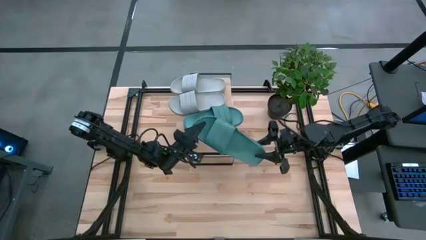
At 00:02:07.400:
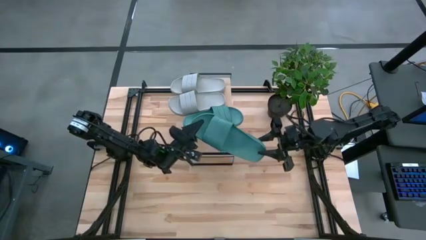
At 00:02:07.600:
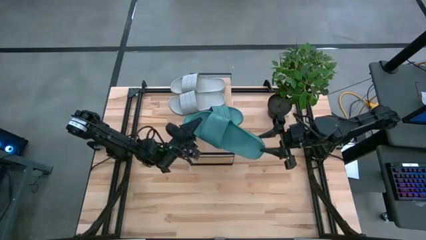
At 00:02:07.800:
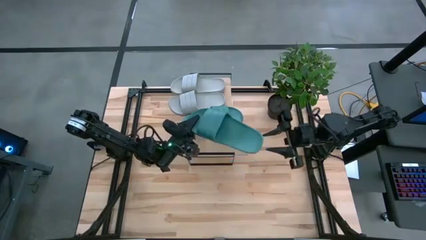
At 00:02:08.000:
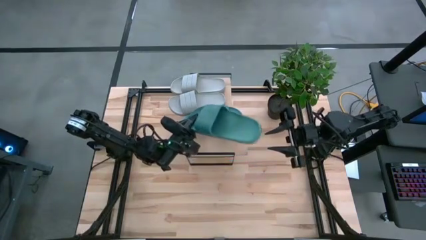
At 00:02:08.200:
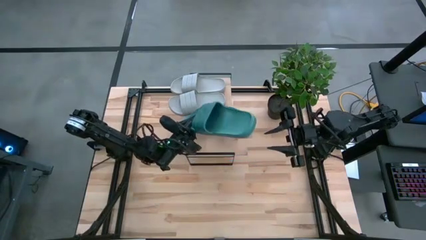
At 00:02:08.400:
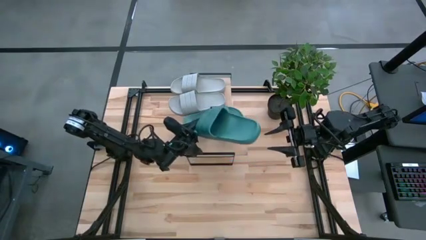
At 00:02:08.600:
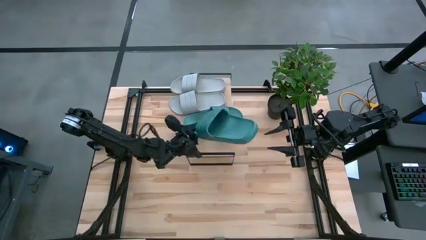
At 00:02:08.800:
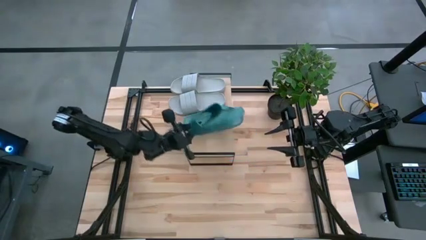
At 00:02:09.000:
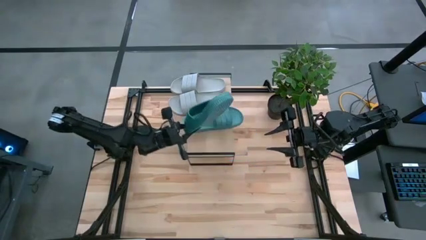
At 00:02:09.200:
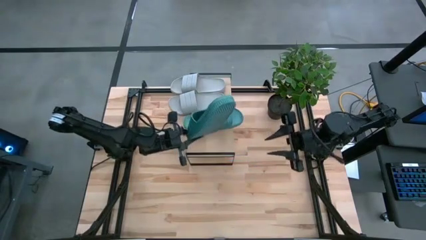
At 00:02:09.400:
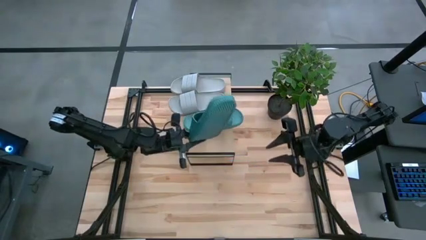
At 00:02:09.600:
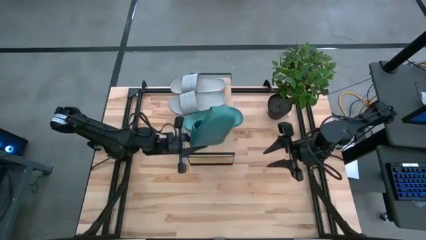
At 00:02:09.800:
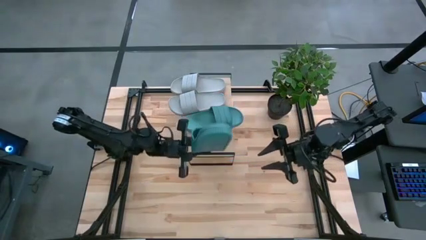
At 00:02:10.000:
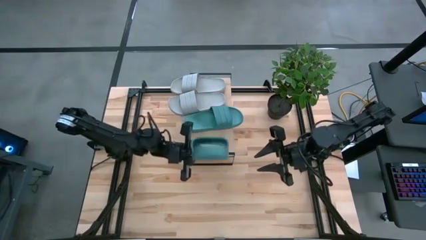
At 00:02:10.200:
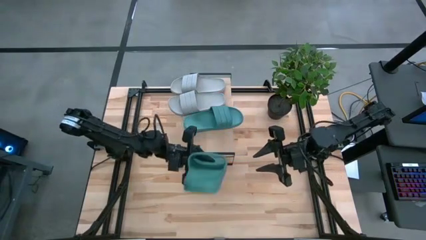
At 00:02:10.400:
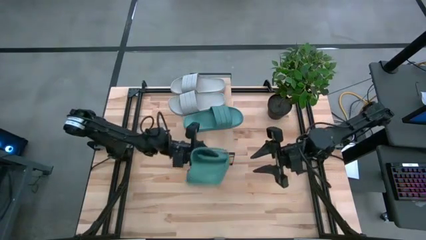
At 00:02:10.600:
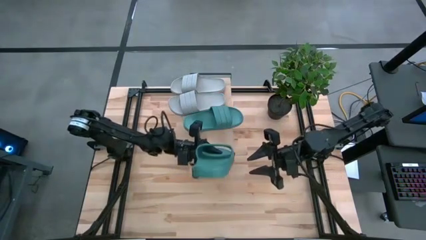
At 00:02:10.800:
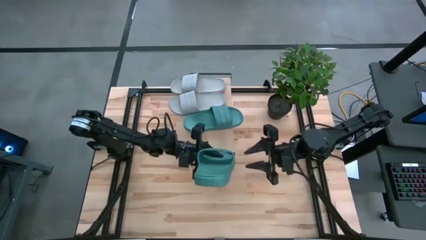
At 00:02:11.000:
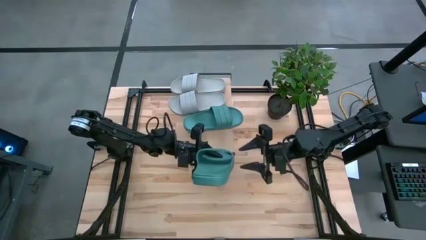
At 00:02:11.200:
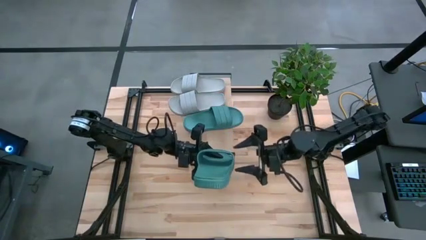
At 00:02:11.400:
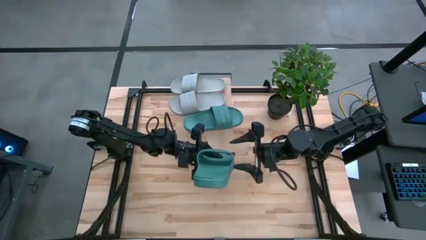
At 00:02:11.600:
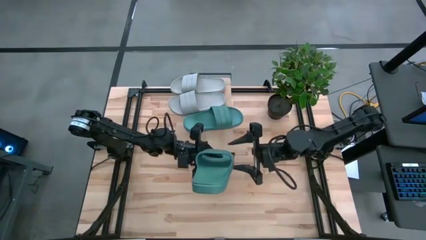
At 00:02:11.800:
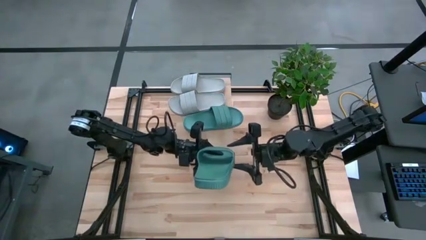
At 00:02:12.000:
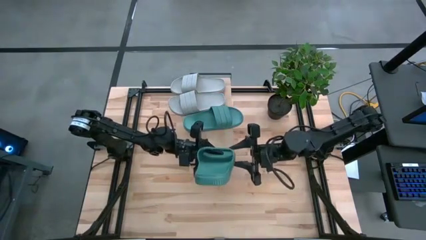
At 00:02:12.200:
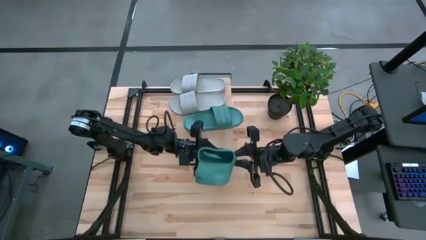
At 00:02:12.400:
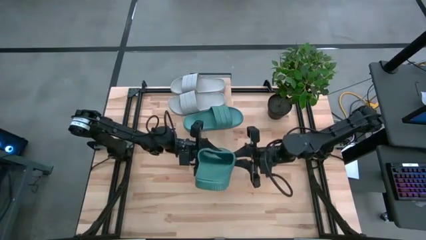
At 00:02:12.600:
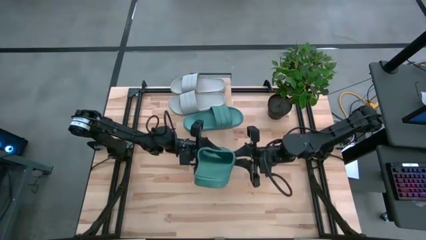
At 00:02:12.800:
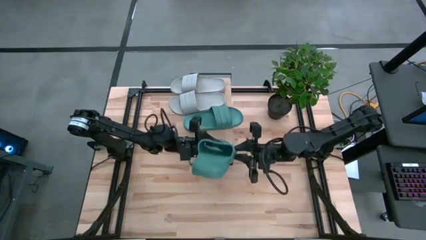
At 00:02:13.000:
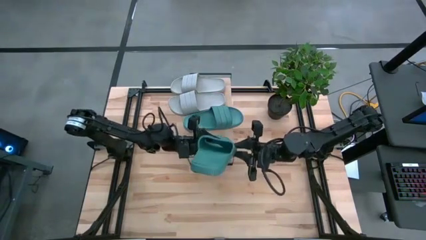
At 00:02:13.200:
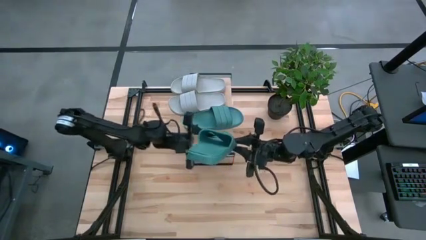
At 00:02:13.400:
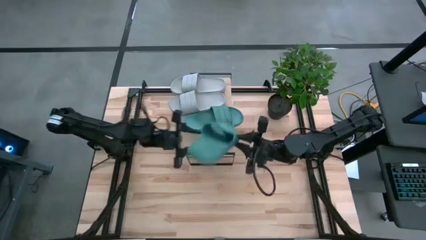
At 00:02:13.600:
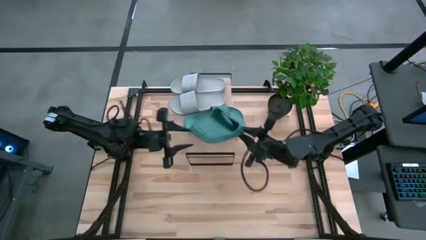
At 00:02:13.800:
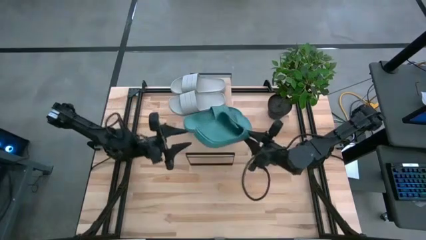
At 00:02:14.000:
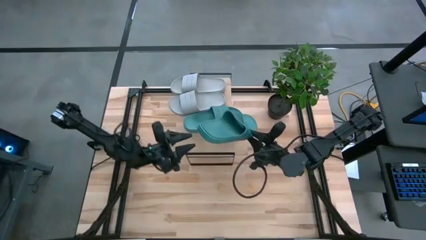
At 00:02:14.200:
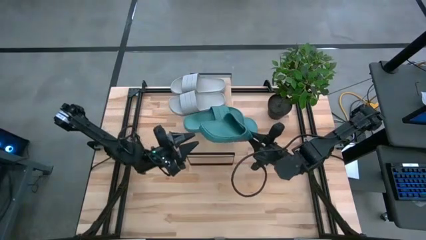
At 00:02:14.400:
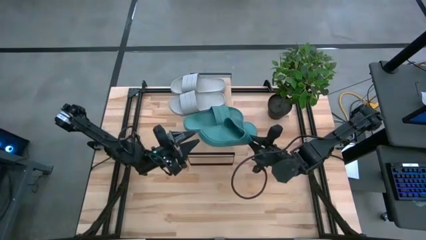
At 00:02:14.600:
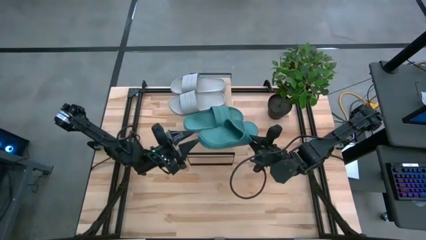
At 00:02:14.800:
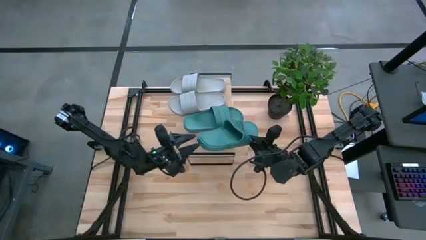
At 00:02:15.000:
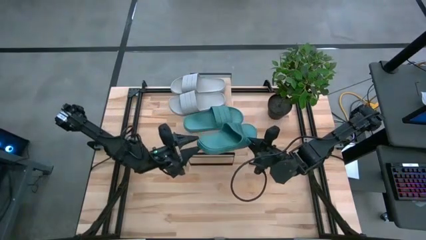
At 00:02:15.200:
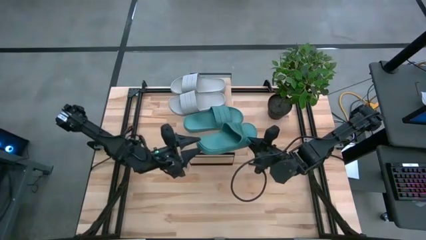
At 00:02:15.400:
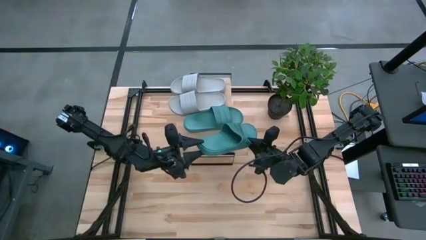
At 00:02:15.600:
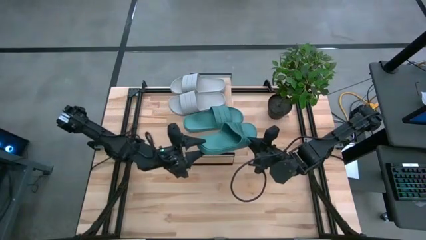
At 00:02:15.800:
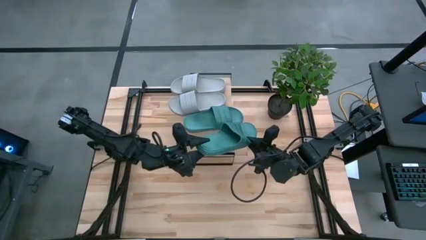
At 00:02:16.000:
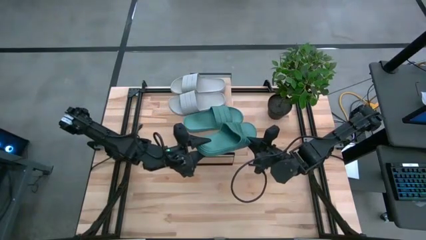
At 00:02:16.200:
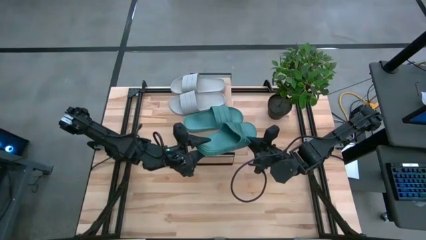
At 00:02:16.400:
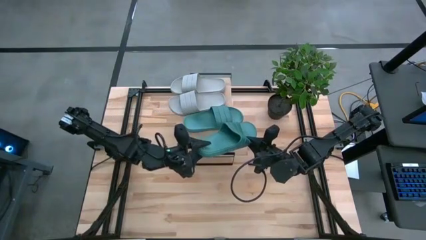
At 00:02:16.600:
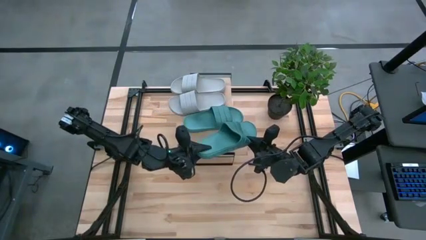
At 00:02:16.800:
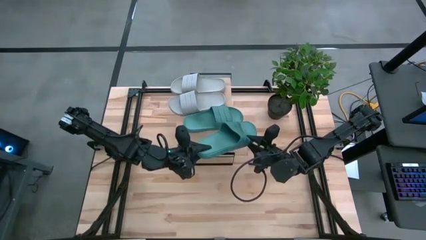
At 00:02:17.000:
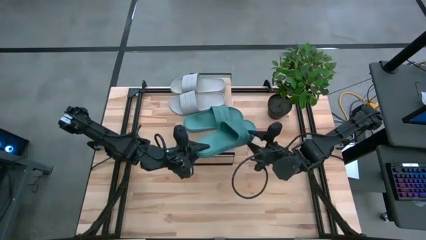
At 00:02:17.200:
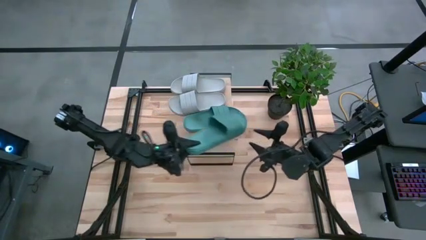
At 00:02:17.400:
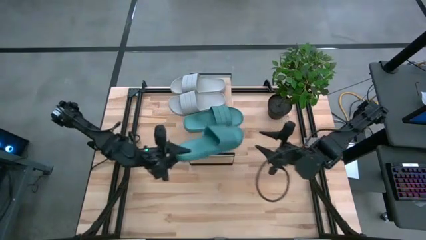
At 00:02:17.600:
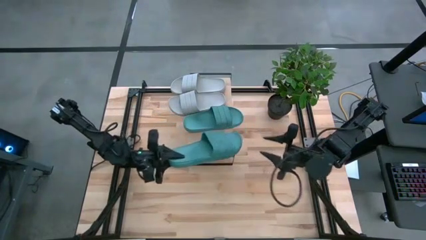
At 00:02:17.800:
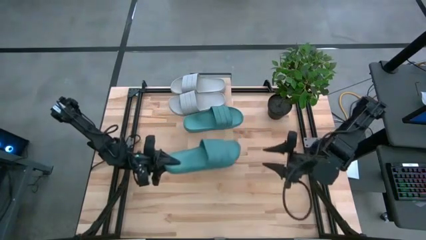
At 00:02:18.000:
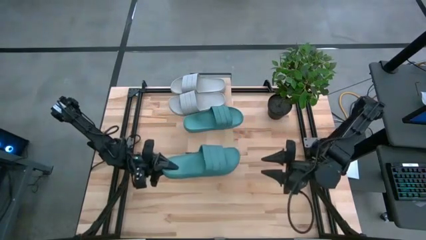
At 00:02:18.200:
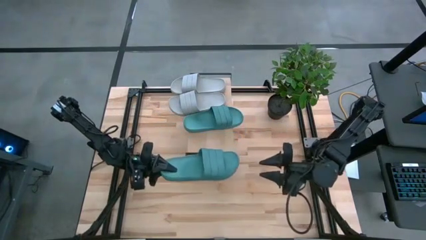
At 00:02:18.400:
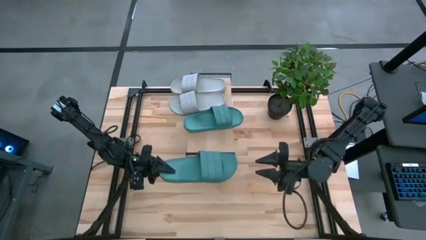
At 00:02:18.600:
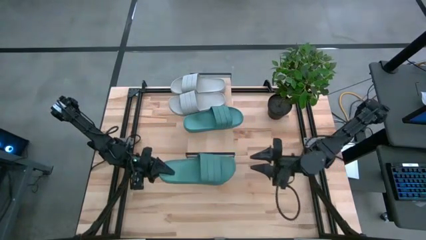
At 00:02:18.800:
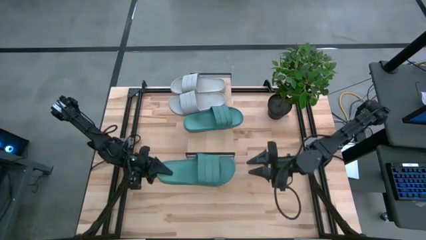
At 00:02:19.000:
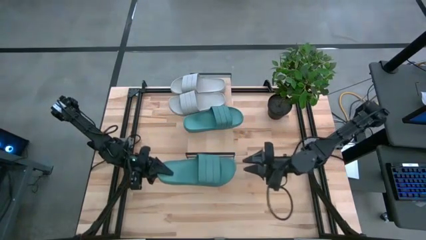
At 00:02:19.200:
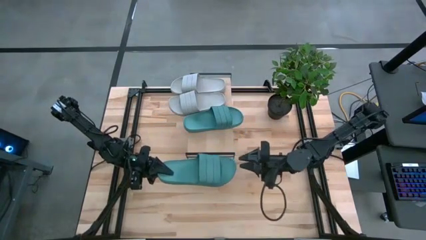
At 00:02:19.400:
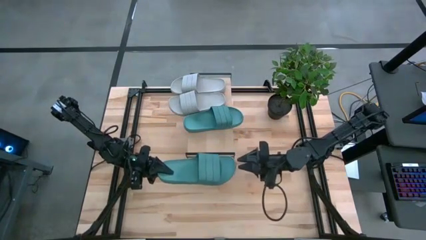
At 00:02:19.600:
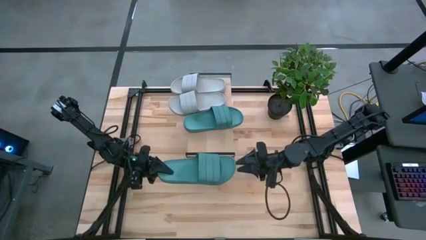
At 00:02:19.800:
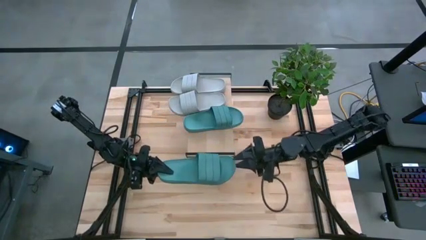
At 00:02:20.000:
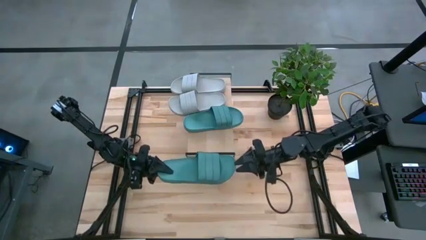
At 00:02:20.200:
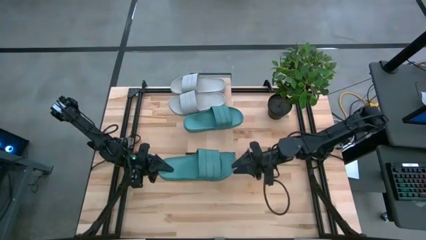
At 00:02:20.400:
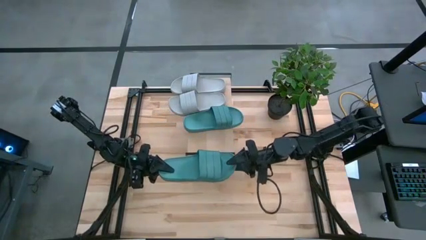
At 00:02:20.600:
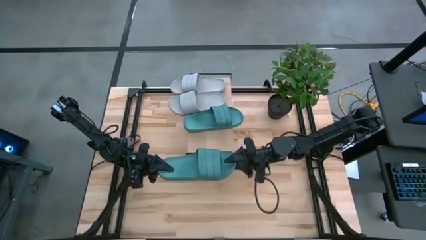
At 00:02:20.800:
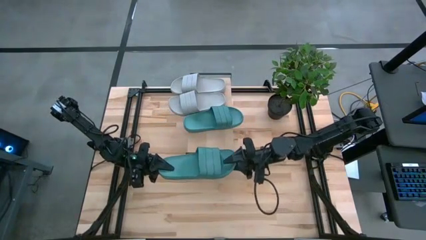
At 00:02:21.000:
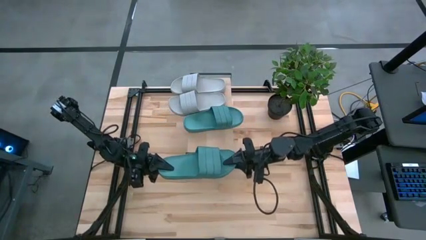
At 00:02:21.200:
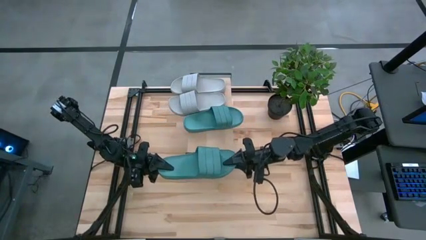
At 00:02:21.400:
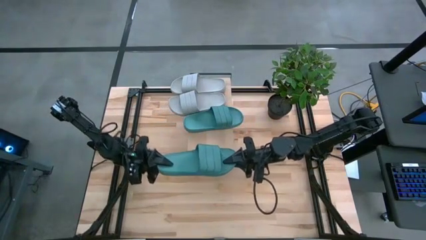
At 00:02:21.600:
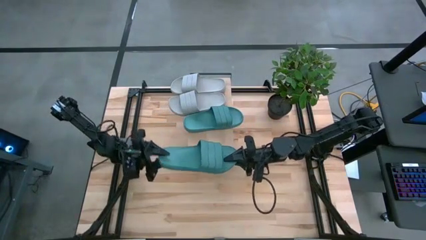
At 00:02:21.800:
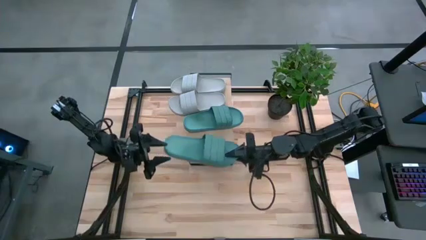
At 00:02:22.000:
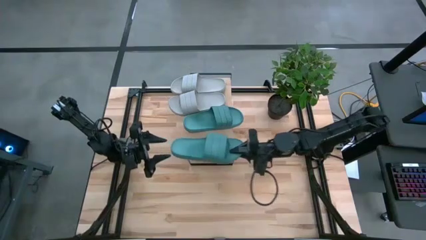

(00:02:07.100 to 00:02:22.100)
Task: Pick and place slides into the shelf
Put the blue slide on the shelf

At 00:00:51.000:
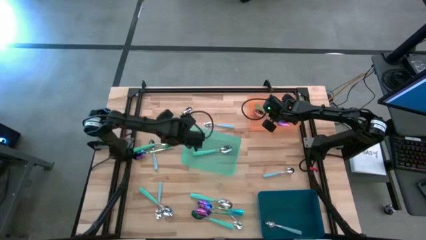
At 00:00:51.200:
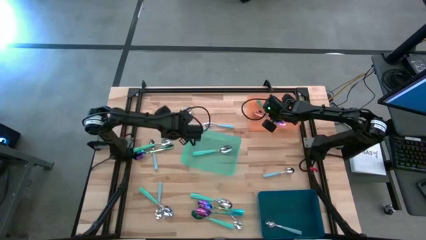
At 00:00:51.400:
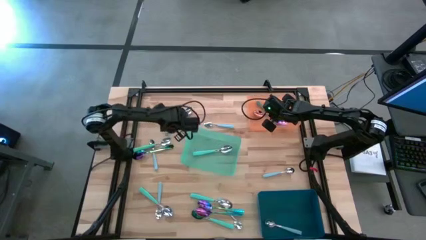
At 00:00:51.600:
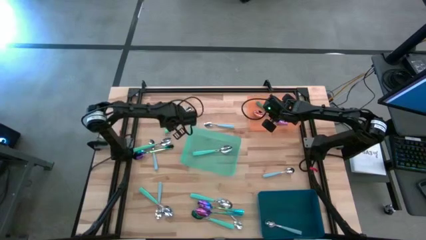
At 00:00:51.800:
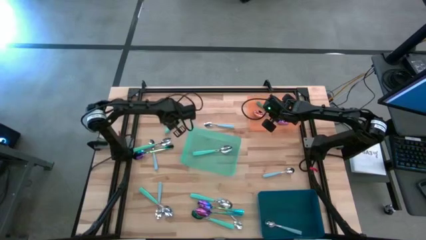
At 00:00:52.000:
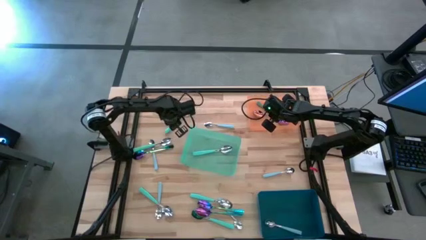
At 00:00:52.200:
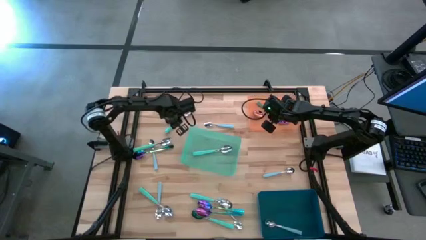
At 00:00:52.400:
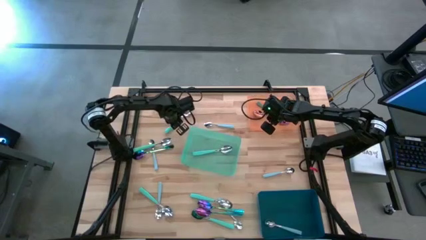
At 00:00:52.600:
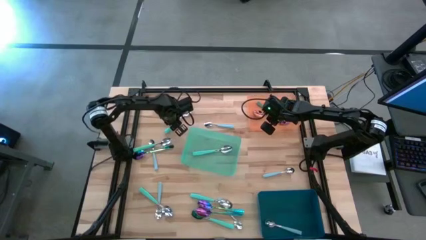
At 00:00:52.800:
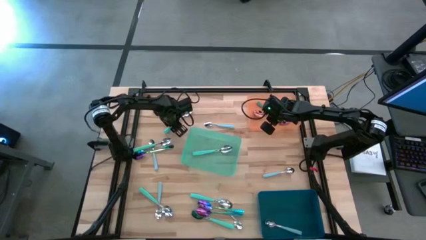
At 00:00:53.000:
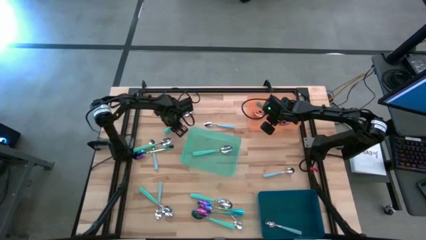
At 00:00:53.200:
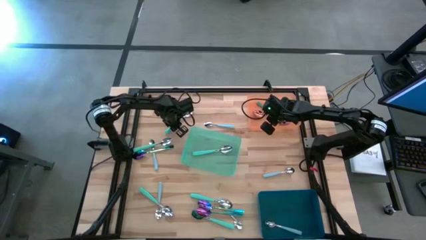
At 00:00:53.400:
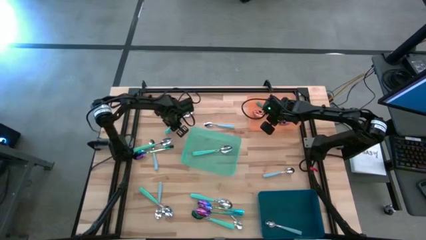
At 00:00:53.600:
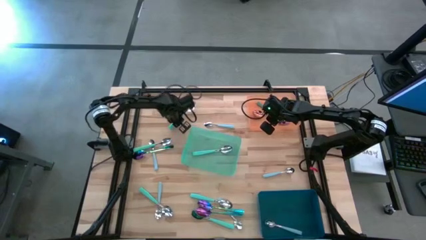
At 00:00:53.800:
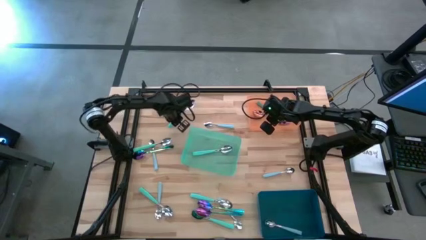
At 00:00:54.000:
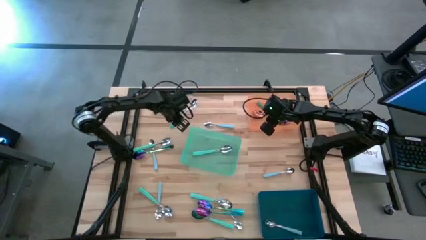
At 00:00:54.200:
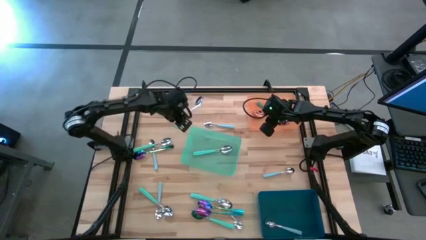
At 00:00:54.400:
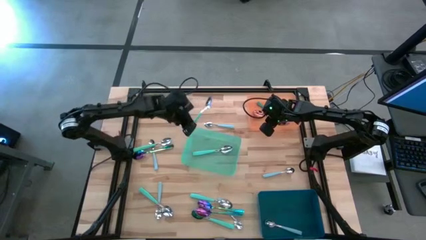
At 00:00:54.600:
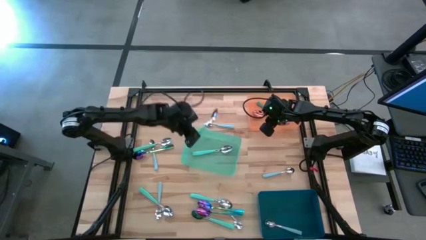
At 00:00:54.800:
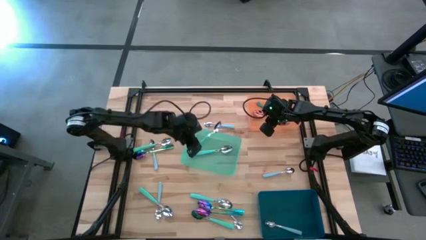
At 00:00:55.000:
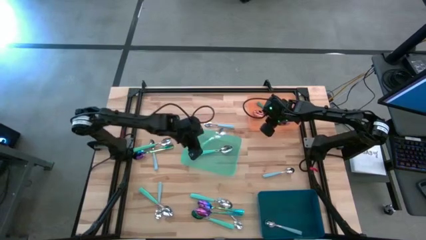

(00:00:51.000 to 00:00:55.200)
Task: Sort silverware by color (type)
Put the green spoon into the green bin
